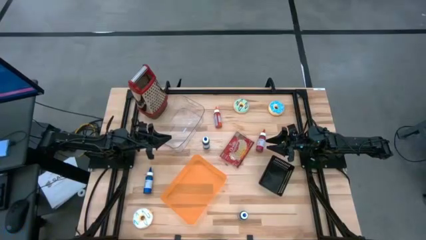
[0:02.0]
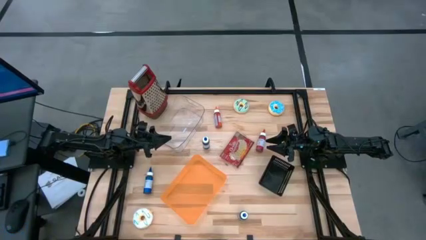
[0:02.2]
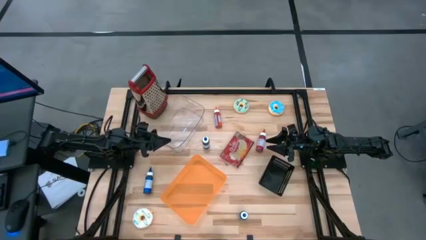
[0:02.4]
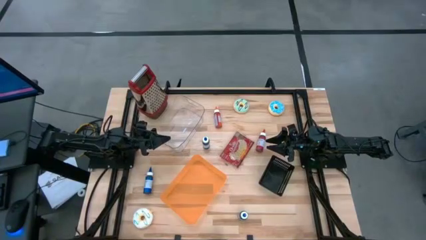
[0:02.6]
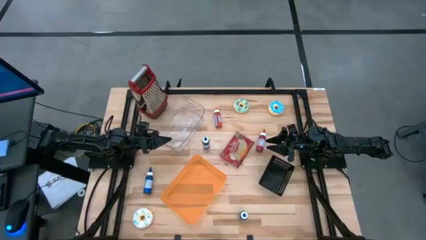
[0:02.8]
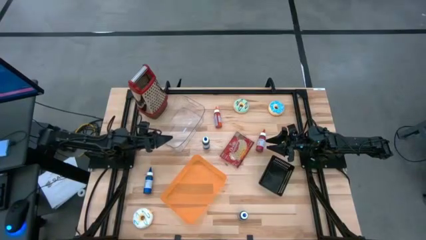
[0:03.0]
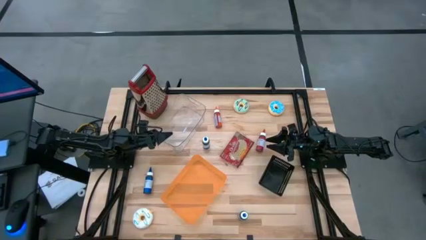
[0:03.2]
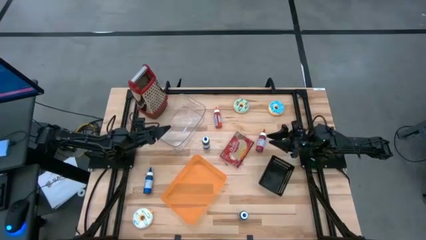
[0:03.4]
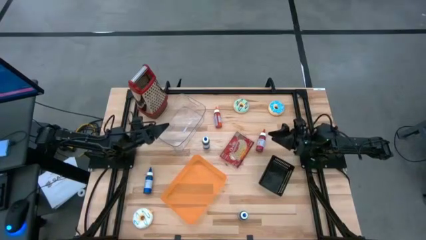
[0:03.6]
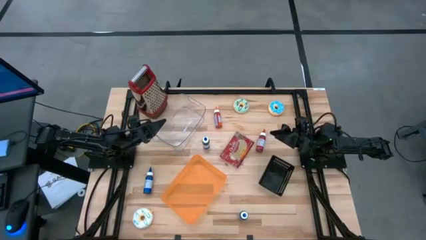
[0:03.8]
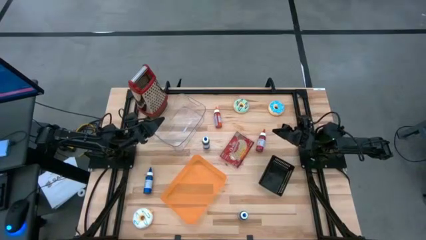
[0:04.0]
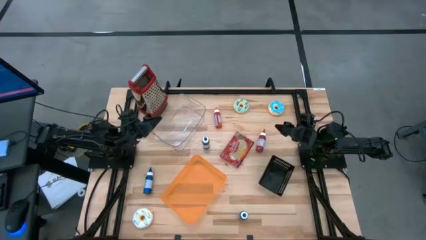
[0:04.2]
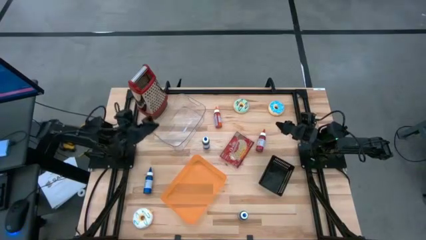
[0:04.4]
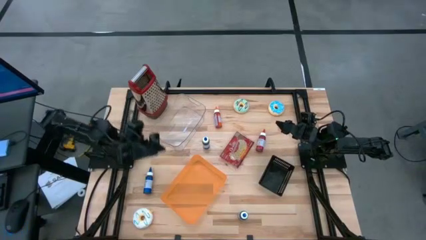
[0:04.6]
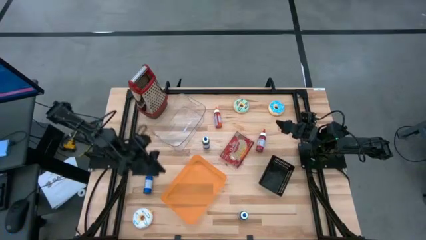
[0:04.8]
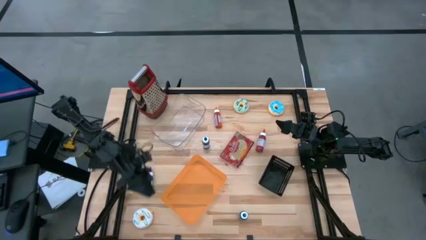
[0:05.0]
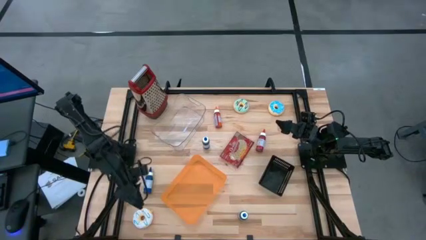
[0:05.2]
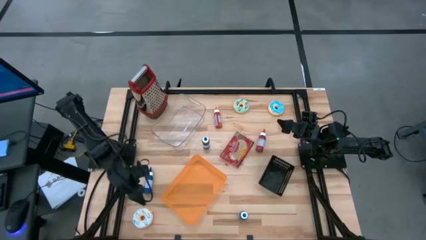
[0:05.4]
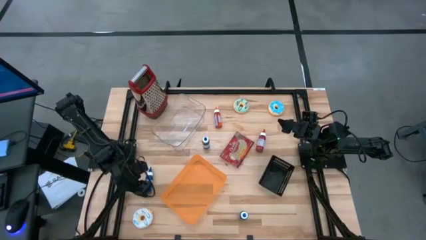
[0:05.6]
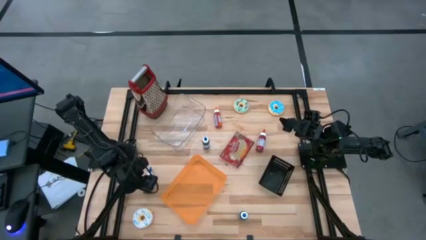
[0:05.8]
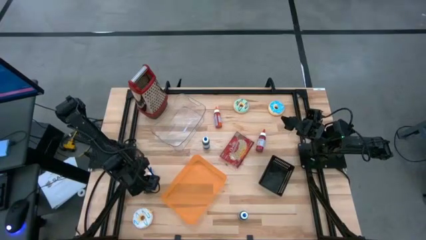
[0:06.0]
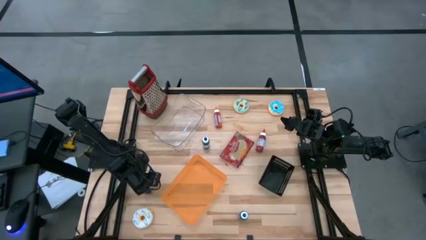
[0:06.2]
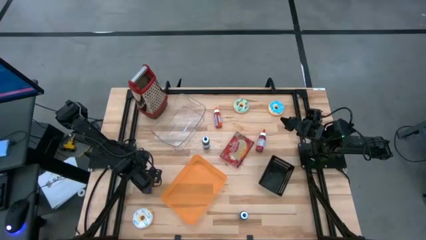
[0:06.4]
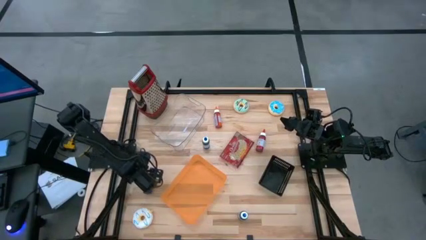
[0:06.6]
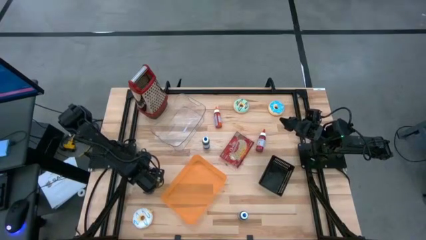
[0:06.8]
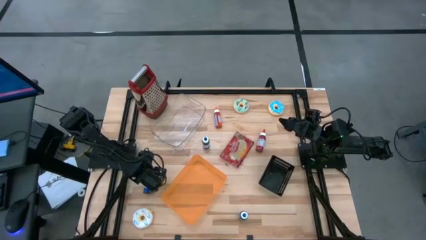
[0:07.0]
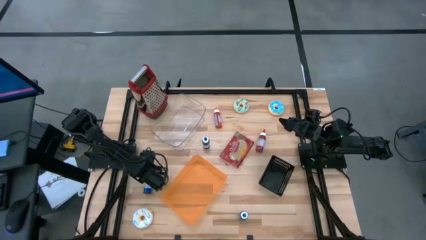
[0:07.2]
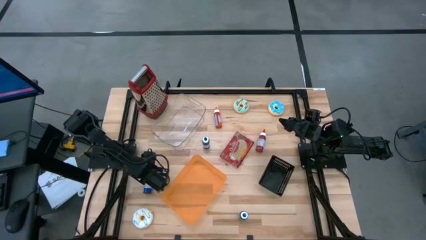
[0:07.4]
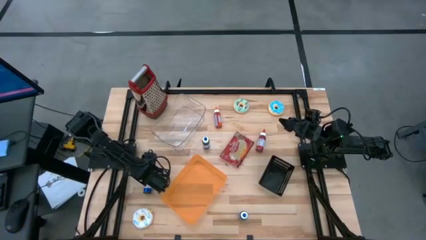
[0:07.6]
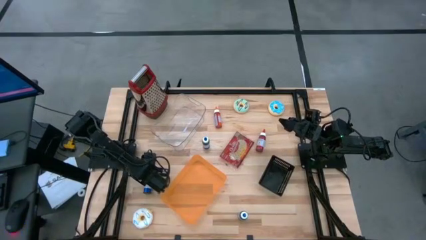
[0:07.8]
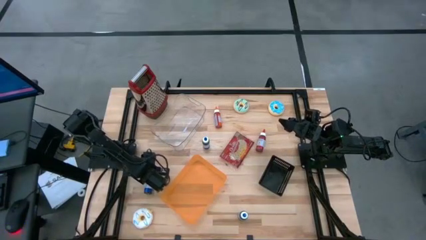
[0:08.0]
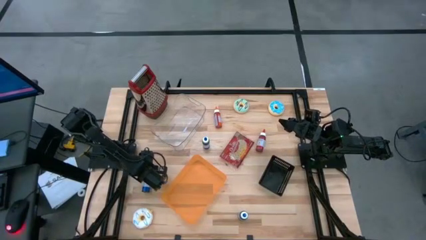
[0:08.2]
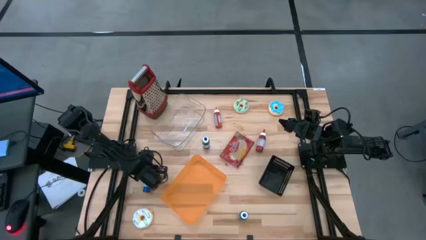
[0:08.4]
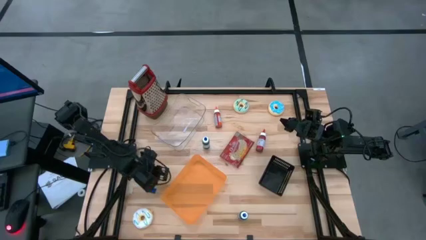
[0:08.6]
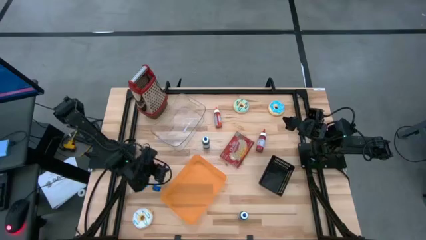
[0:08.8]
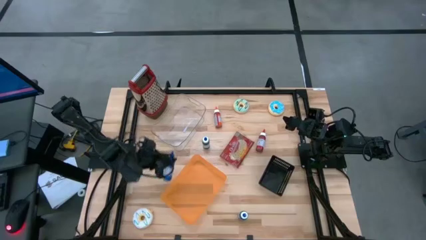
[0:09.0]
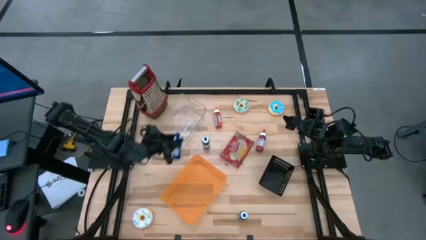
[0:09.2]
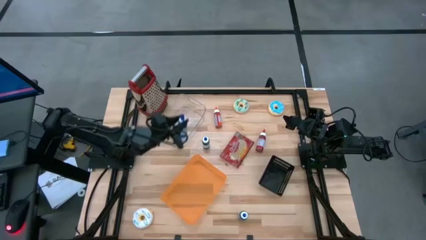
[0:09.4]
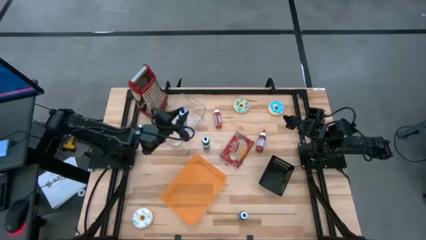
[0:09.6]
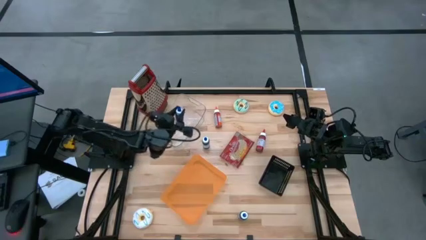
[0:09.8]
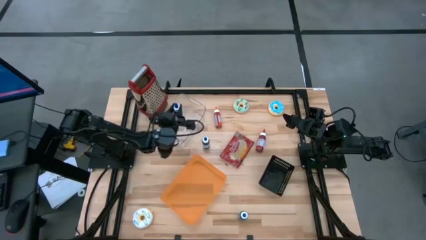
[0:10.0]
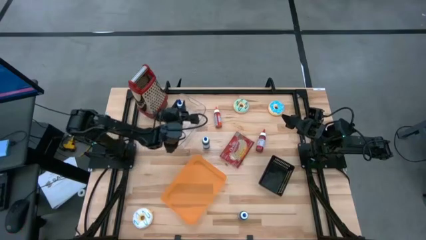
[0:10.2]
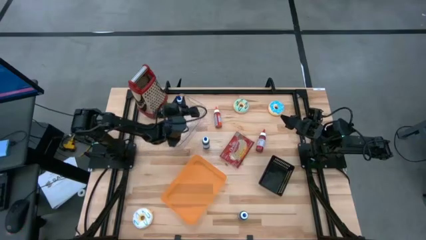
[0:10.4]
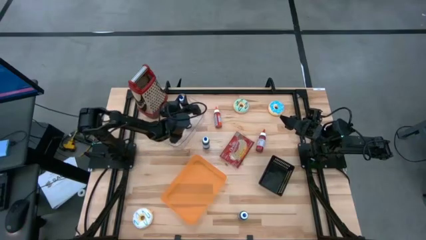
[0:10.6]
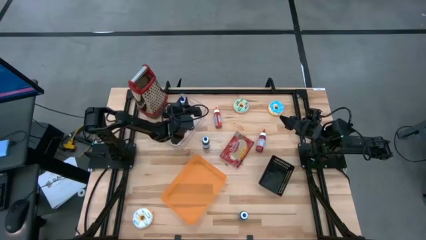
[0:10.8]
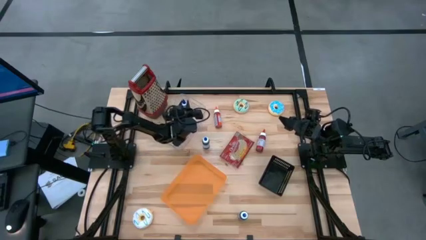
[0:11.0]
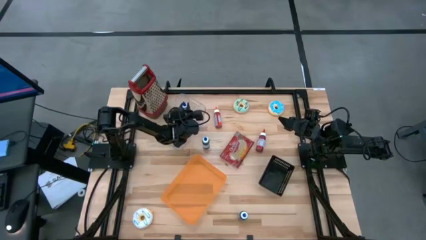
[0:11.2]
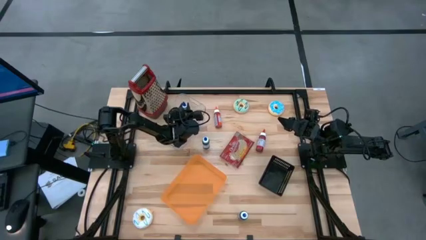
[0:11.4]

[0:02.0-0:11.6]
Put the middle blue food coloring bottle into the transparent bin

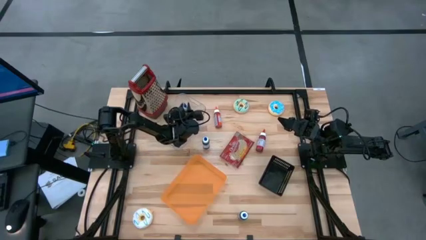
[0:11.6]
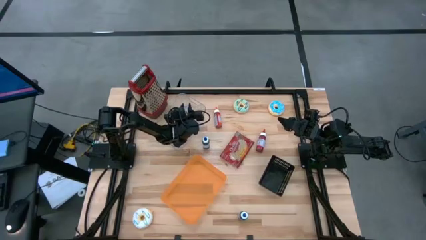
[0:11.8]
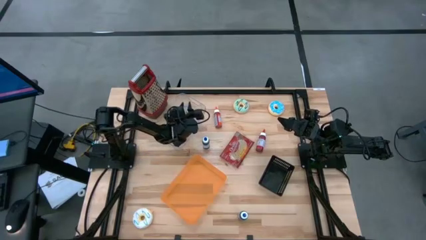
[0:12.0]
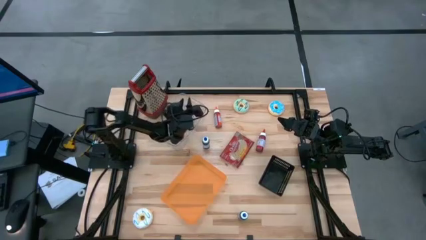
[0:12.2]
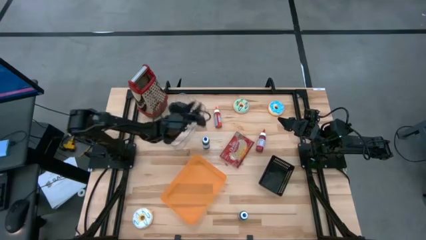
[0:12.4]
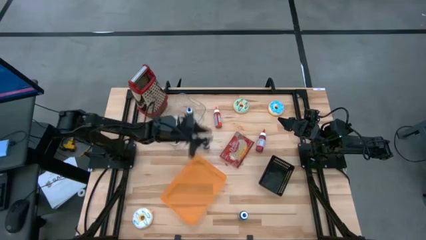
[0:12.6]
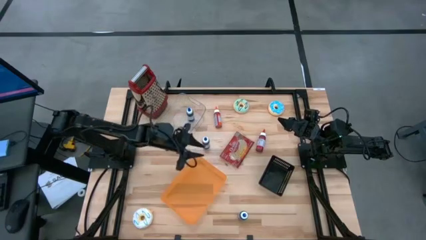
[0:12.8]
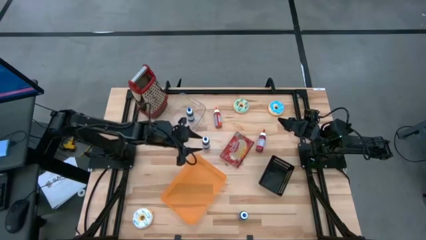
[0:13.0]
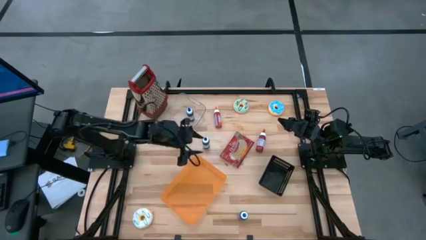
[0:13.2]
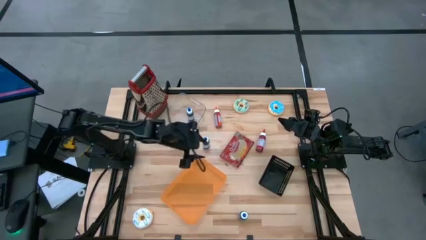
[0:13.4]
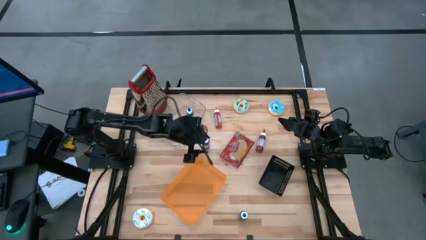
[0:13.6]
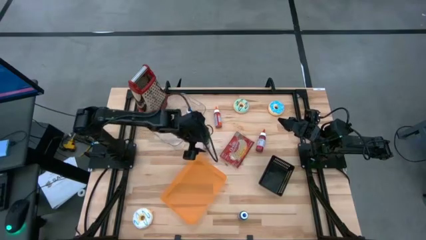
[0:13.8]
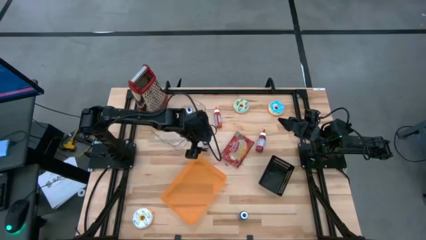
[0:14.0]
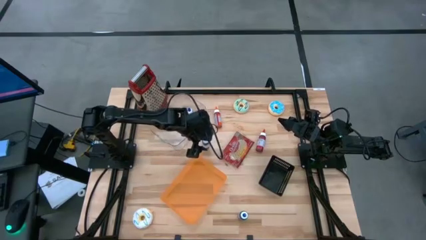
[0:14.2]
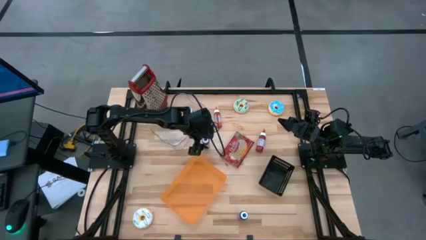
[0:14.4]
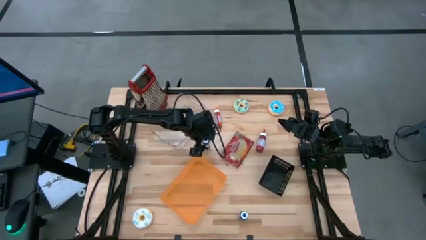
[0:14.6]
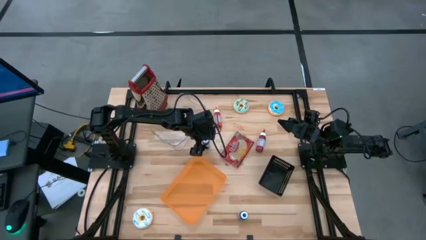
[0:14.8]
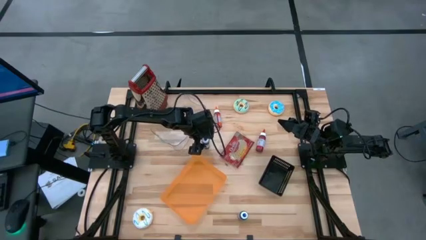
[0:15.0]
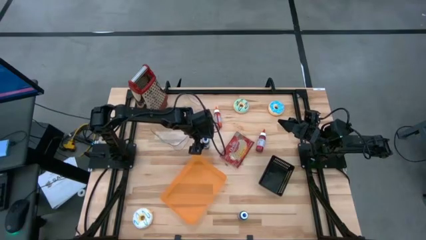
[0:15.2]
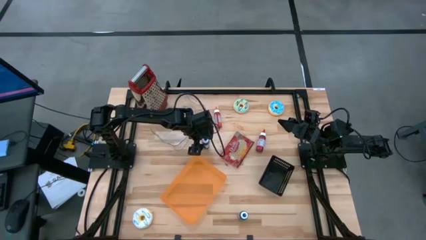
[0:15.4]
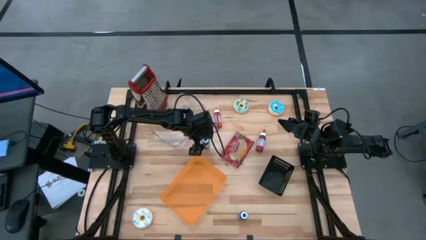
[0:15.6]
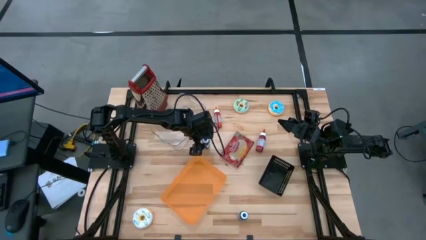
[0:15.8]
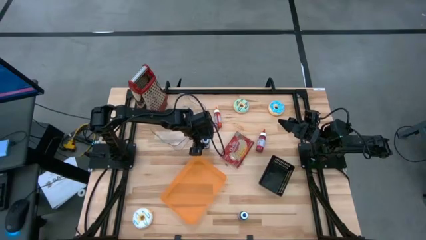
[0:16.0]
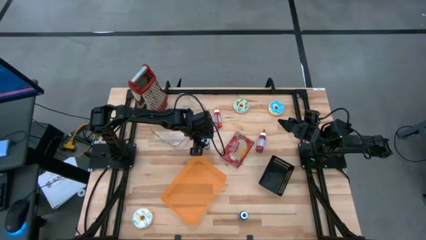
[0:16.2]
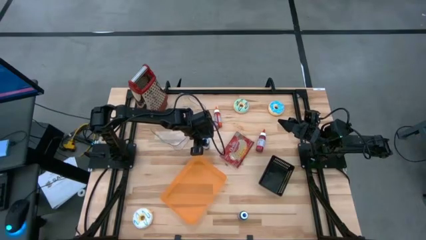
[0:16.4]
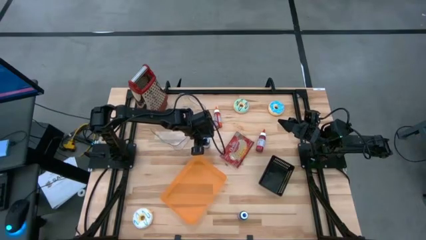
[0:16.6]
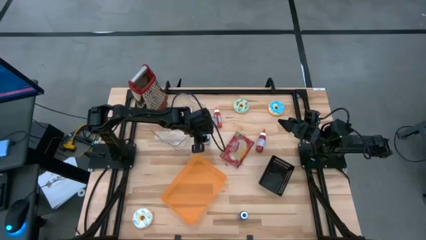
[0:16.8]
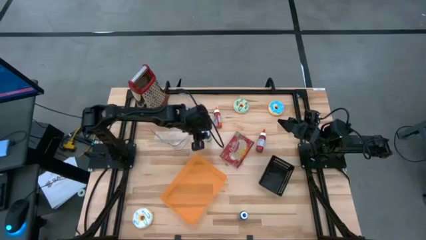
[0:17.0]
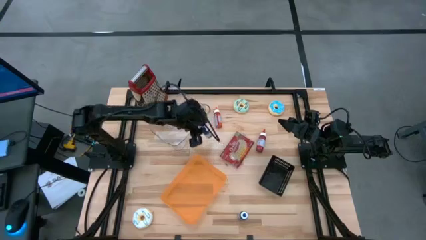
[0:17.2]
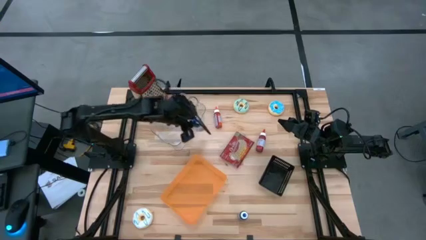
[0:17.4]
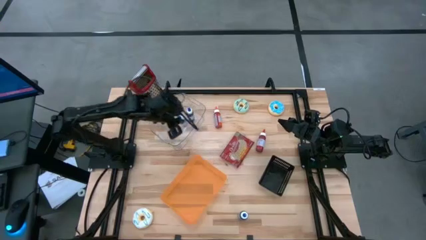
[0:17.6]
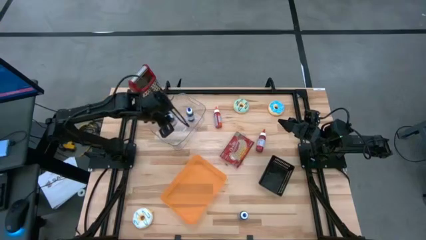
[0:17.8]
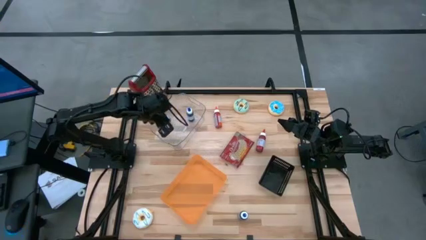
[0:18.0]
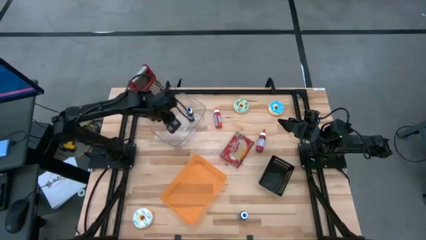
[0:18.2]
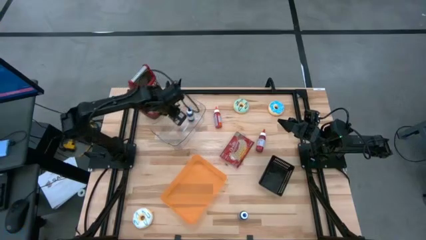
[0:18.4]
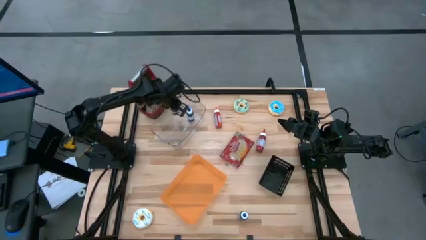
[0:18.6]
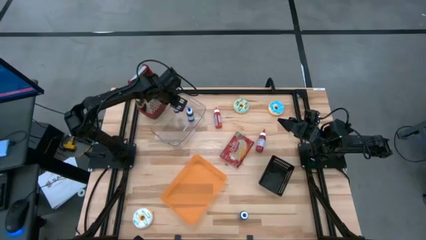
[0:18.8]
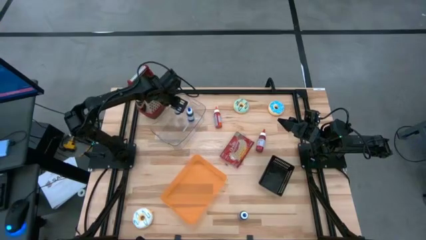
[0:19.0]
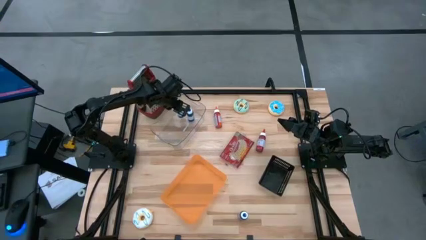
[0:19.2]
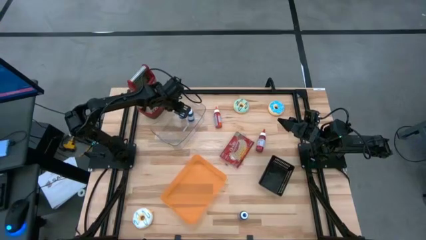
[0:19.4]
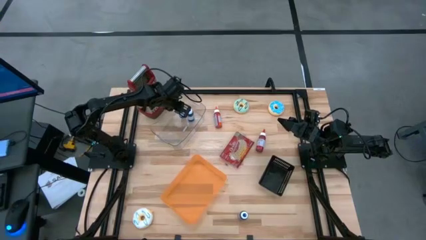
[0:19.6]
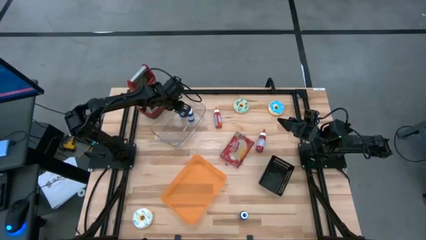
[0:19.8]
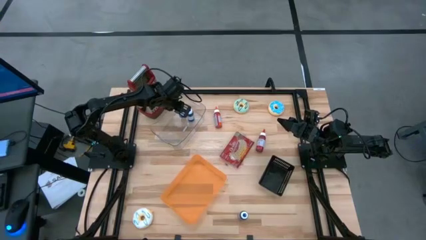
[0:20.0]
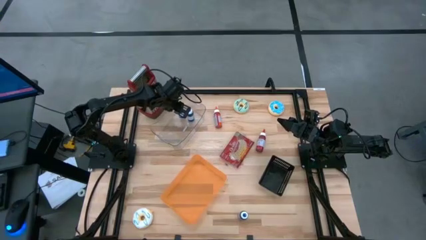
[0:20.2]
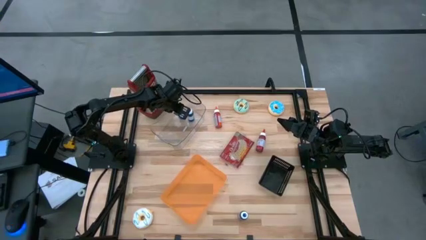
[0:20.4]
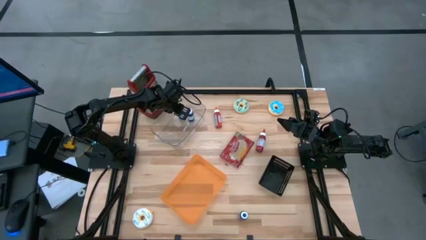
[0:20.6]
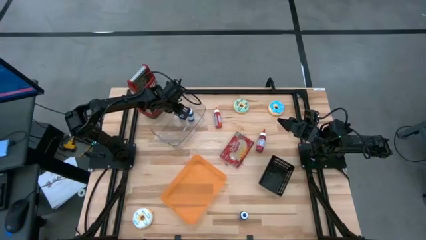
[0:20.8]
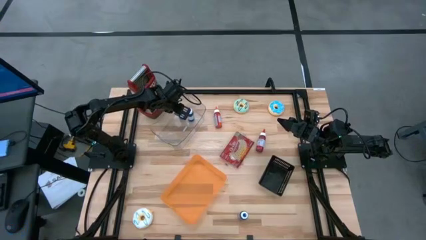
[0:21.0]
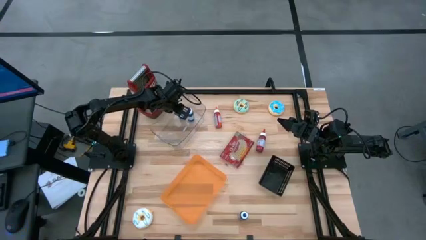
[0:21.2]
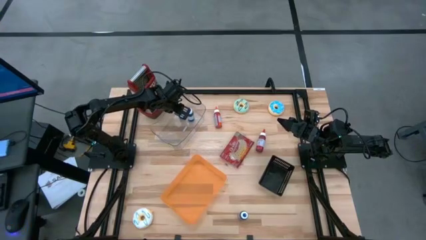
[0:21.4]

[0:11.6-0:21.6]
Put the top blue food coloring bottle into the transparent bin
